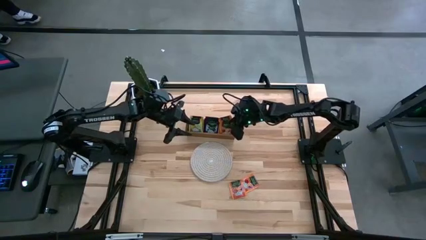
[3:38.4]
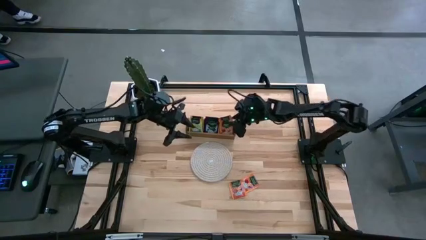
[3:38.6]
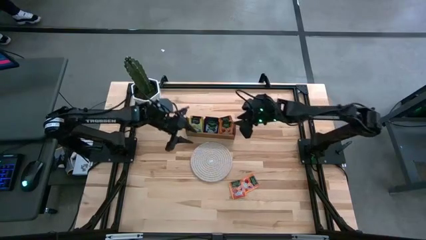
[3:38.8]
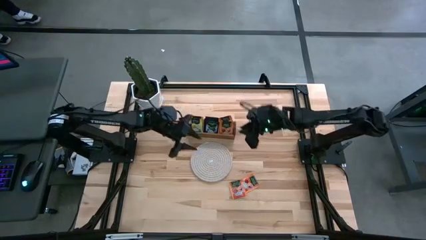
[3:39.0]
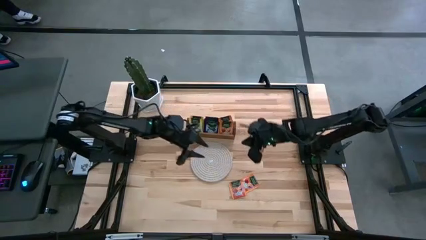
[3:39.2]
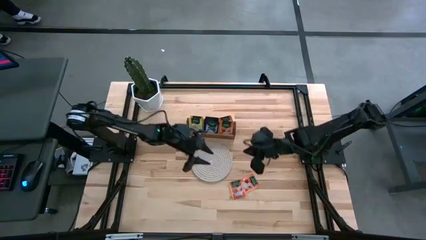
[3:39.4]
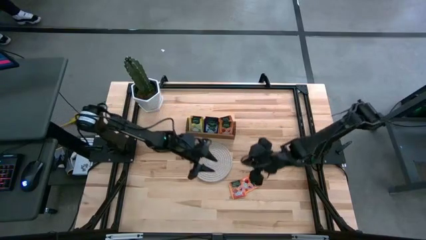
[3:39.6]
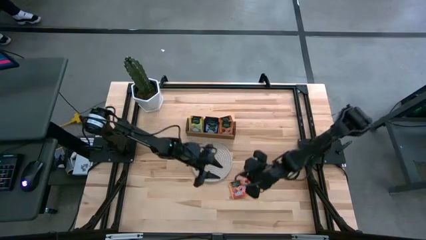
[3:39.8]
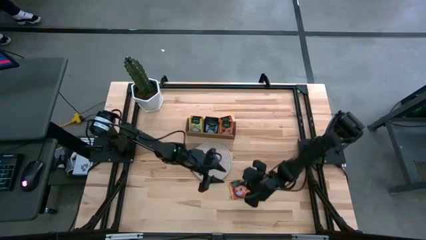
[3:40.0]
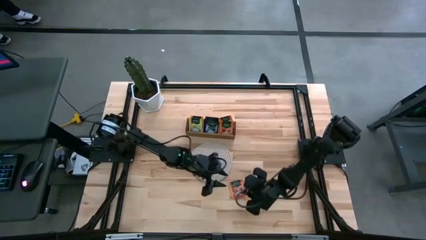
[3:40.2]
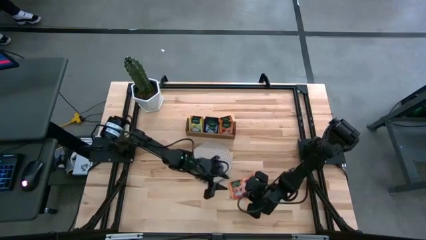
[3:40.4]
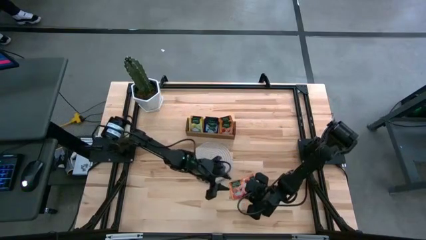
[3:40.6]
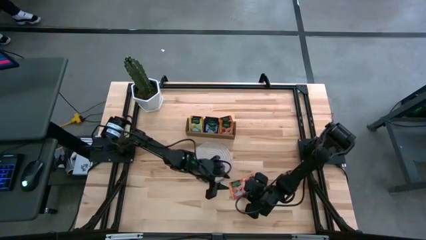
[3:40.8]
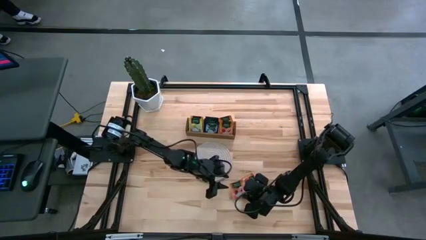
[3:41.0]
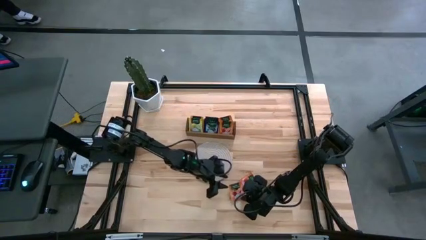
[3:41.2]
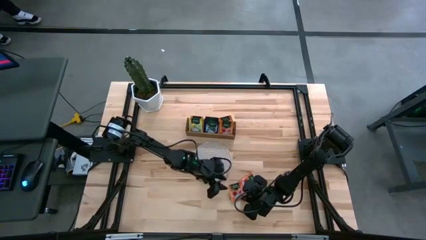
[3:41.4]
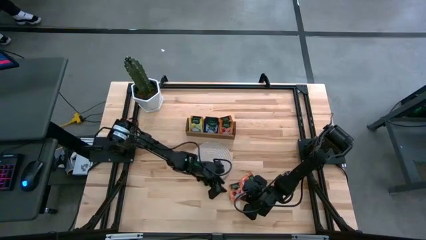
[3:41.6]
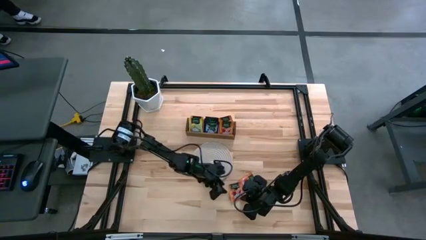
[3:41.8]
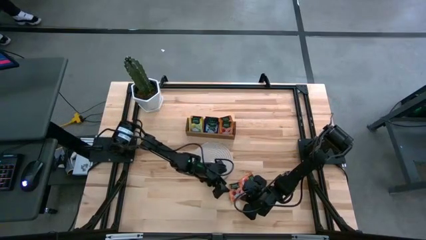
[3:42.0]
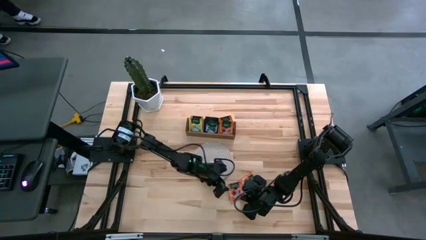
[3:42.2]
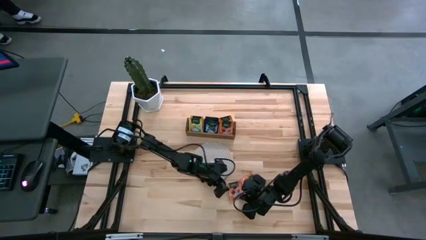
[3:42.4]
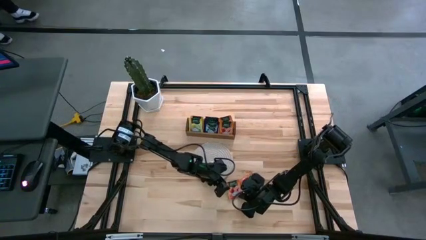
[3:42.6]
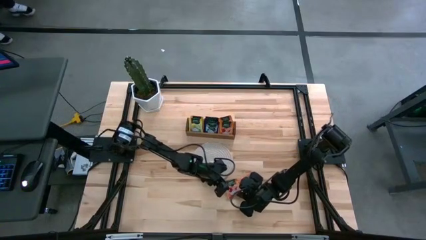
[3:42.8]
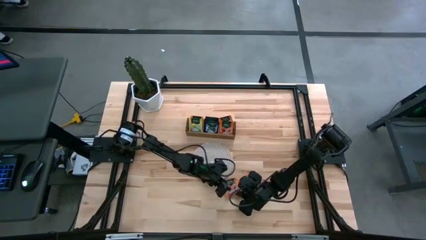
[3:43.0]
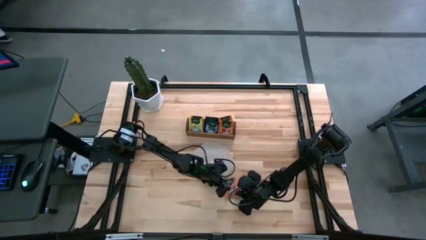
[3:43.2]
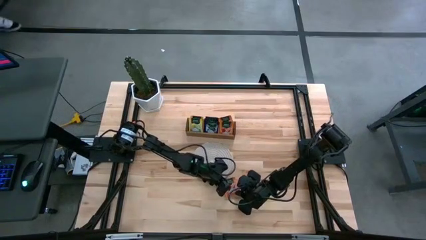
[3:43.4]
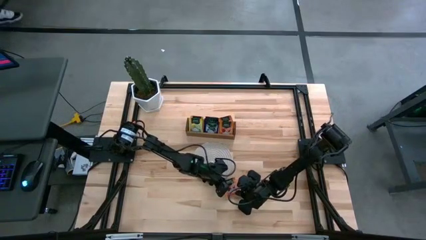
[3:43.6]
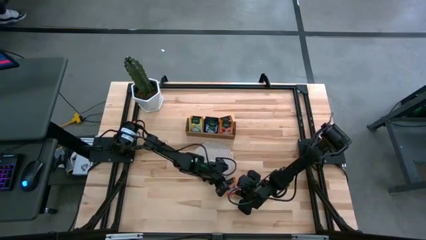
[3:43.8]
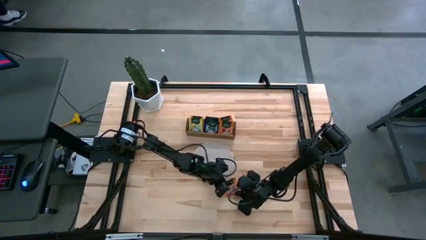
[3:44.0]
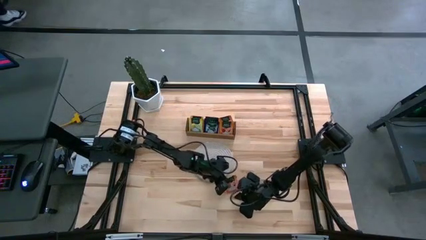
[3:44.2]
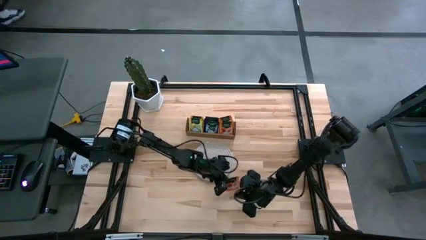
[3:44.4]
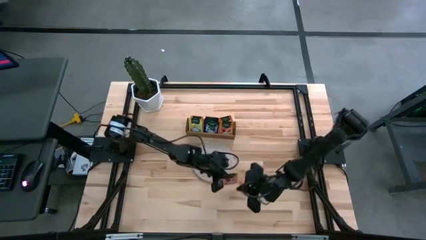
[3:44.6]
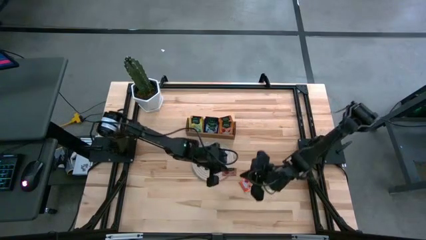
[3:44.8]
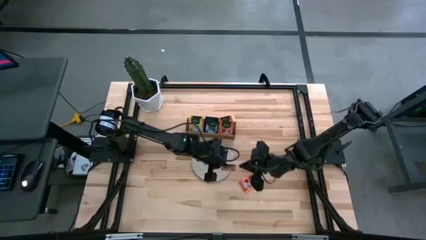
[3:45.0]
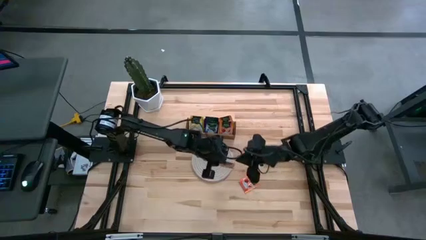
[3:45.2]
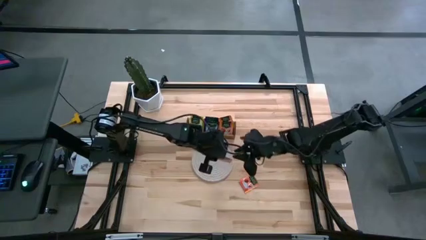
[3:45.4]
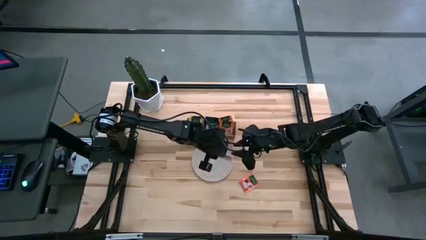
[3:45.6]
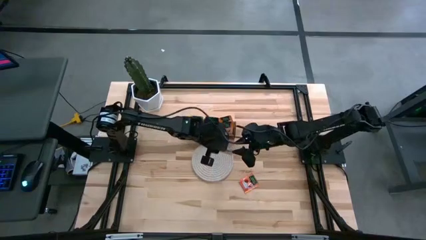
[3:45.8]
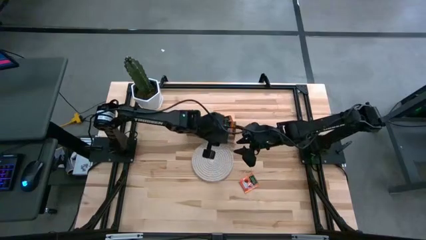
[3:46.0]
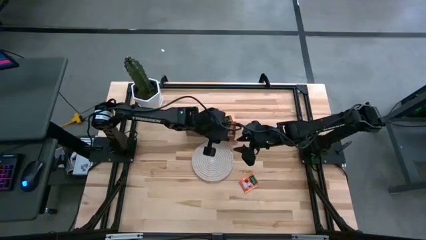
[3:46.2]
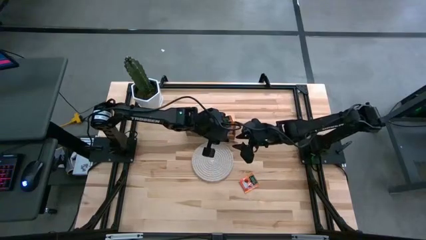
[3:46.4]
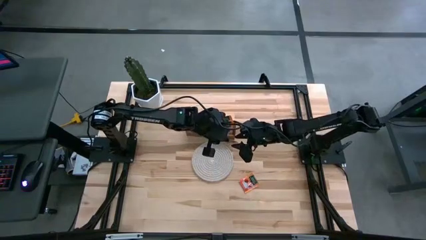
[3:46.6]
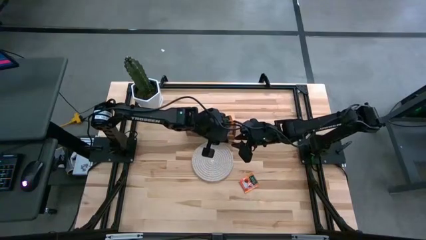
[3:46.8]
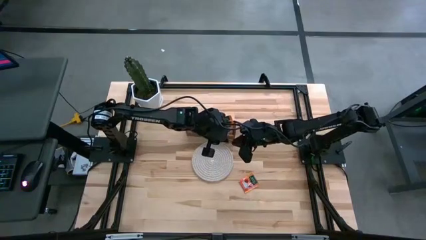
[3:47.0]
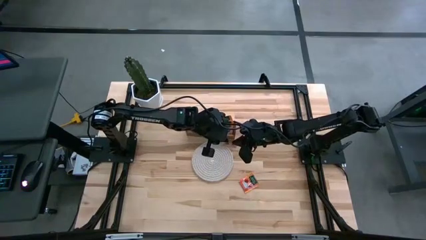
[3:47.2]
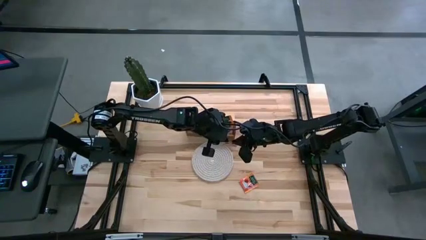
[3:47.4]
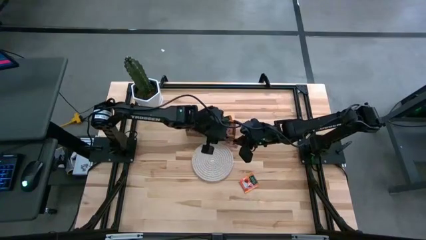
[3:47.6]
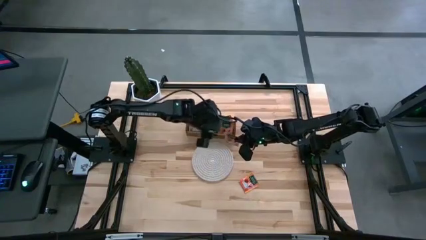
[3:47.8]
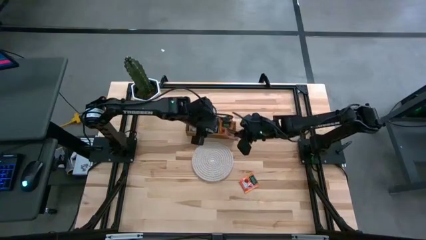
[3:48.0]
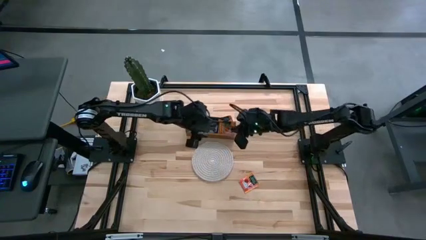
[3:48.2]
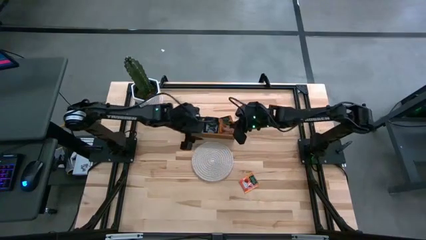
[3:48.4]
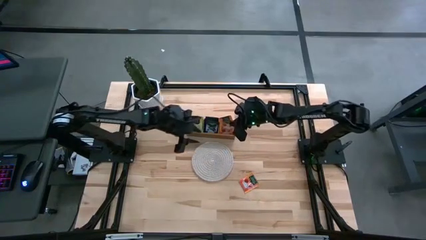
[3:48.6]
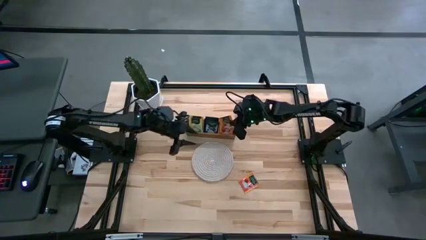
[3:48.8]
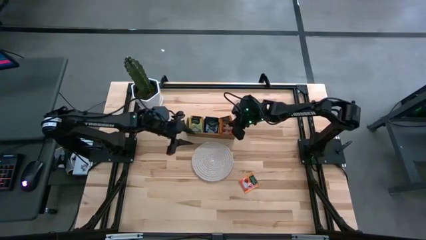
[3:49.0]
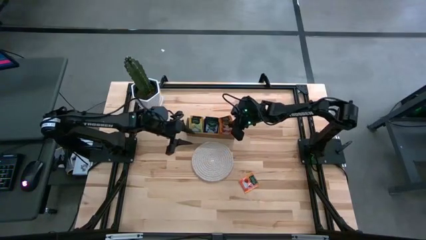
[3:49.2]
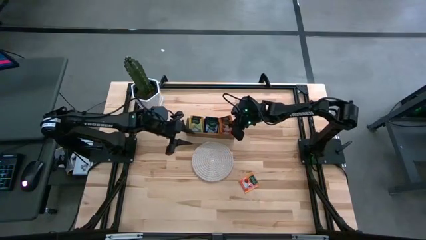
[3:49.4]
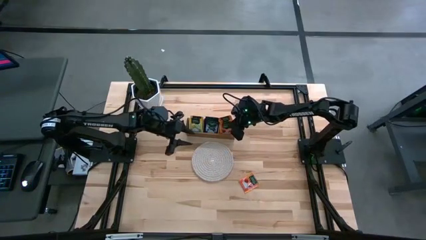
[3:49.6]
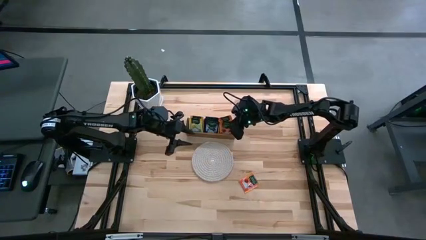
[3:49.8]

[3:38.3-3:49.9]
Task: Pick & Place Tea
Put the orange tea bag into the right section of the wooden organizer

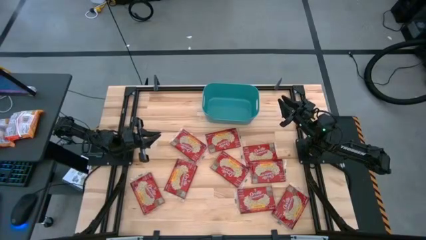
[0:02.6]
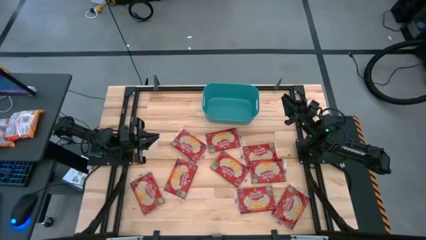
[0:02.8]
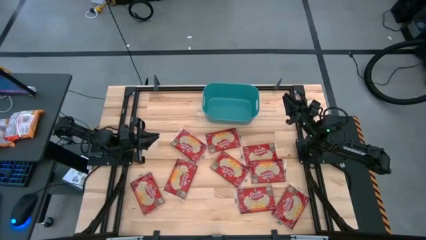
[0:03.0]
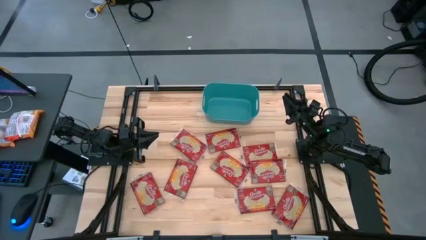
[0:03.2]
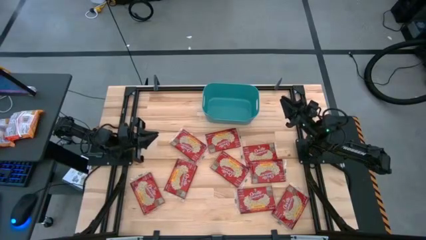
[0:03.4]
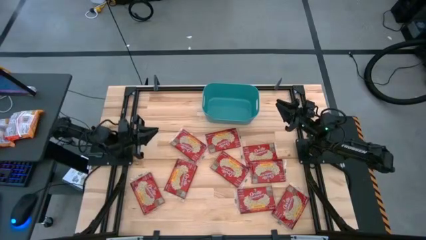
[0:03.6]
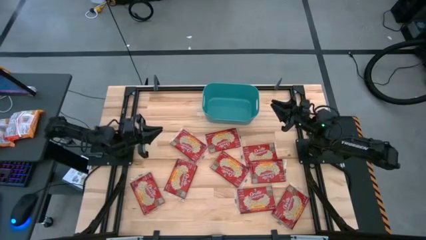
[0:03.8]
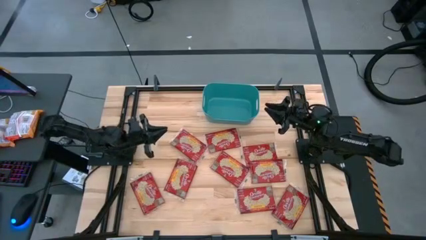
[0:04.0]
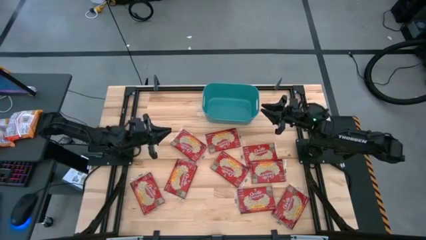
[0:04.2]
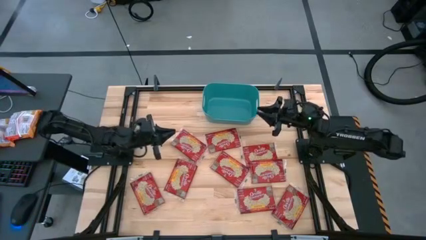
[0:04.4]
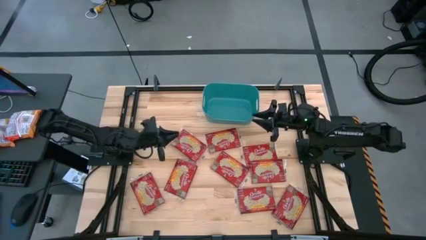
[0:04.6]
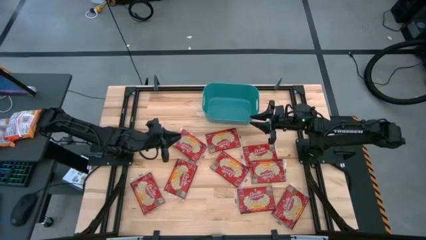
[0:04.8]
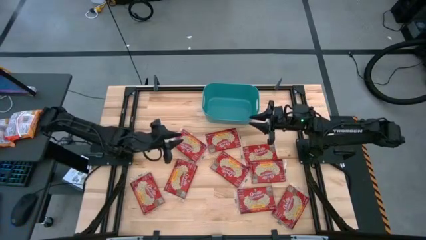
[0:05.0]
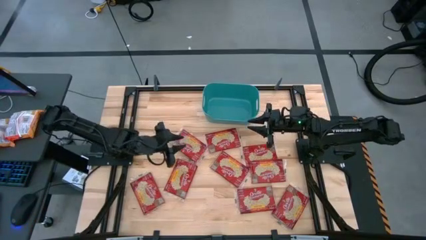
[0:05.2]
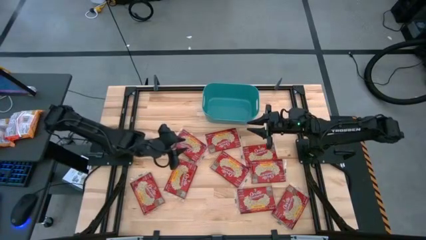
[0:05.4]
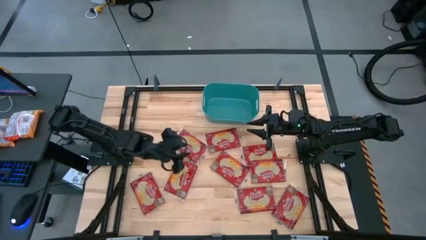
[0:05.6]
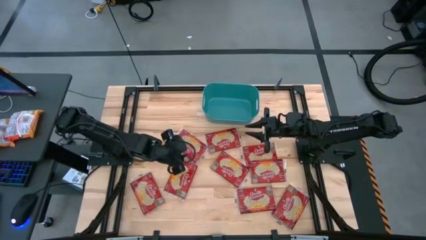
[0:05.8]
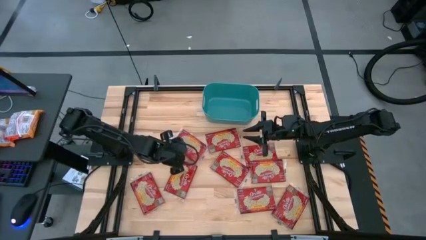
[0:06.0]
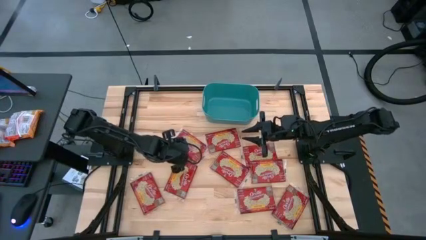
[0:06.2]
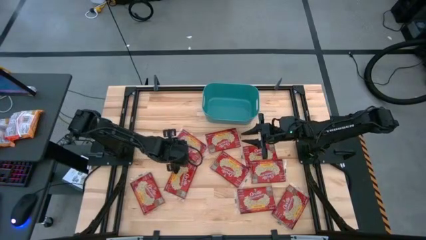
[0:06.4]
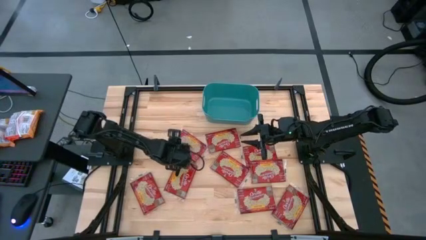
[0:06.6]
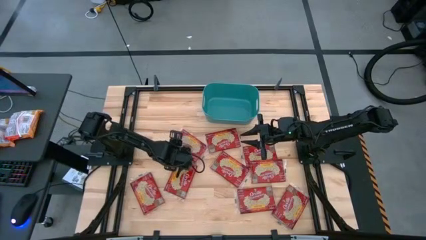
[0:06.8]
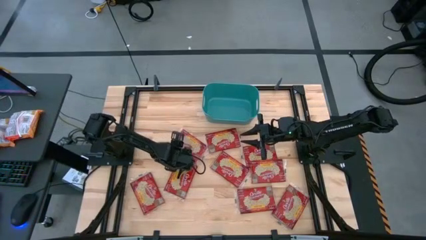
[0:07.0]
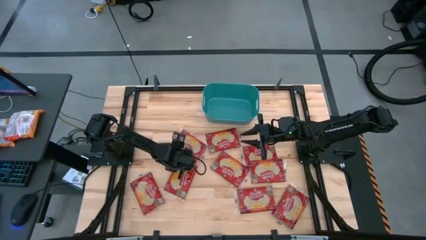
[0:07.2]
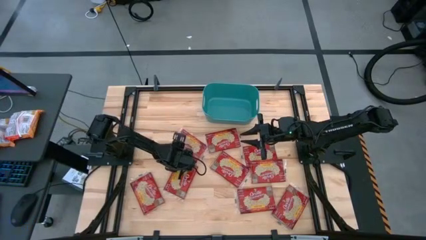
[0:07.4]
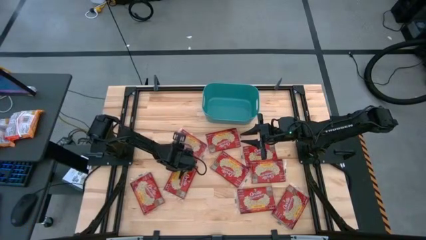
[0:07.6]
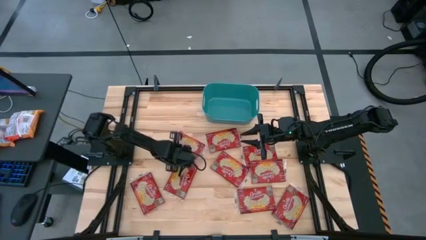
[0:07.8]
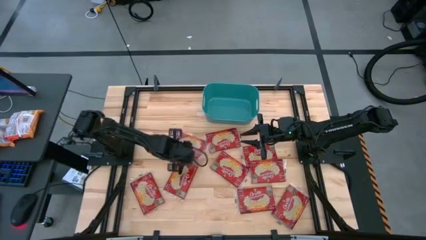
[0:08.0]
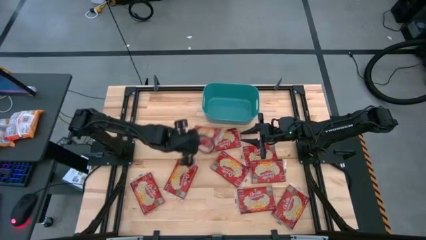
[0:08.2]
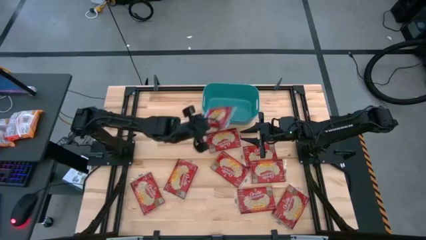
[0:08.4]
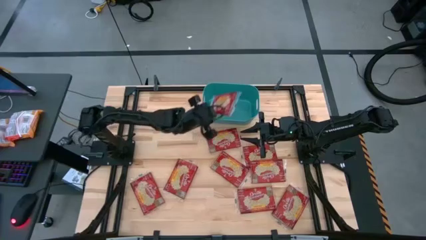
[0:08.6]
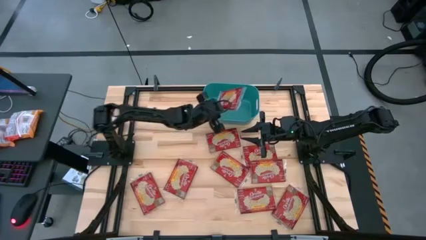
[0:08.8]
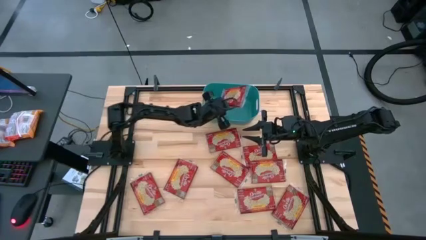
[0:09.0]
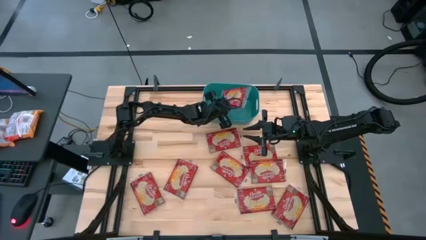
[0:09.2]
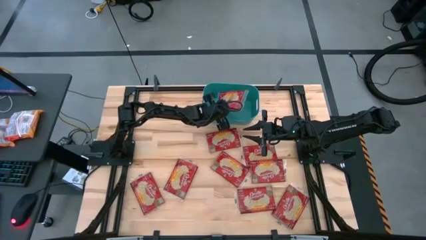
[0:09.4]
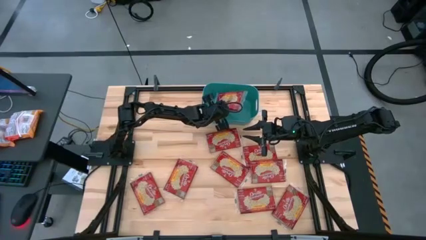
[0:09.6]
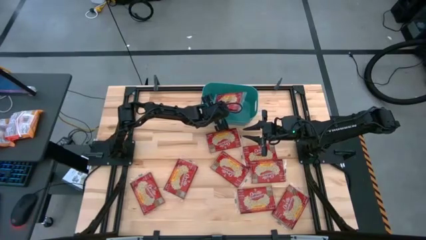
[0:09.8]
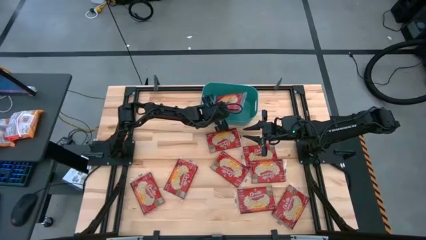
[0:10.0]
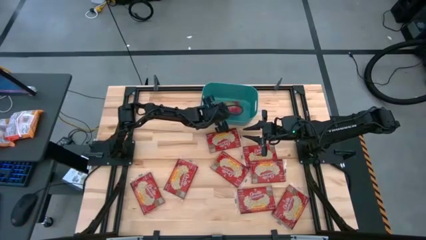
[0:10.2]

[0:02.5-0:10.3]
Task: Sort popcorn bags into baskets
Put the red popcorn bag into the blue bin
